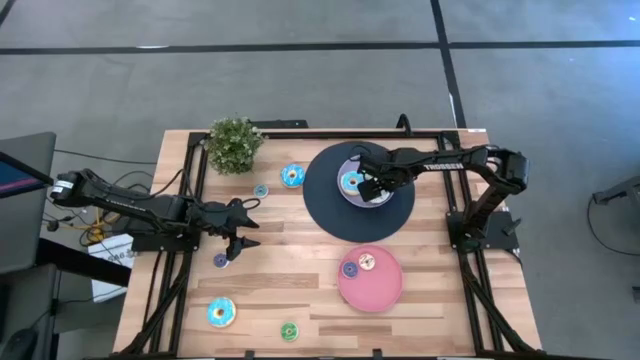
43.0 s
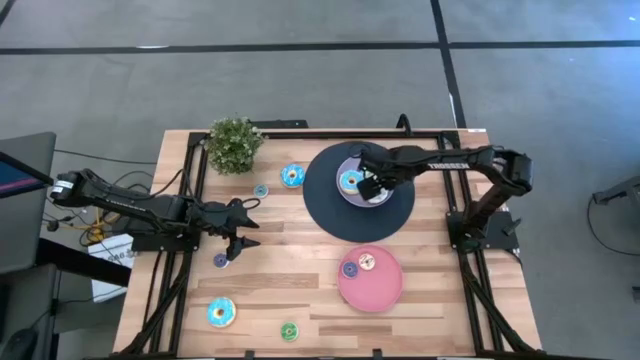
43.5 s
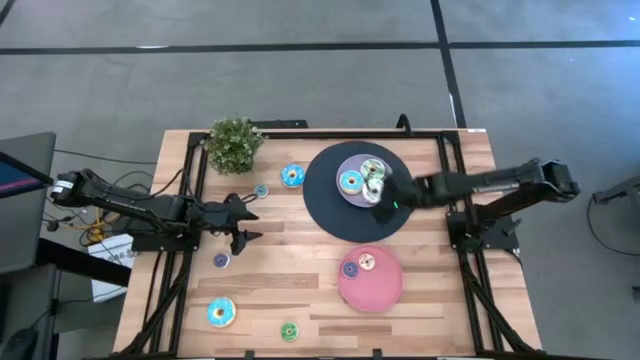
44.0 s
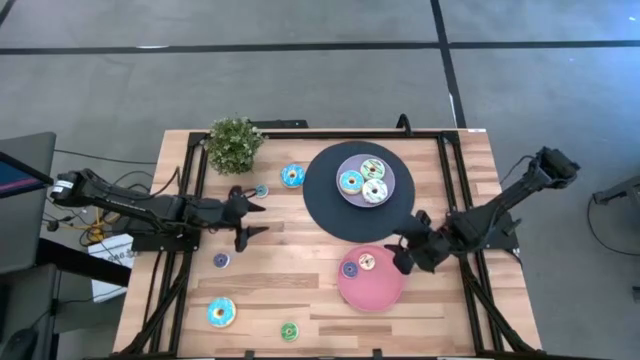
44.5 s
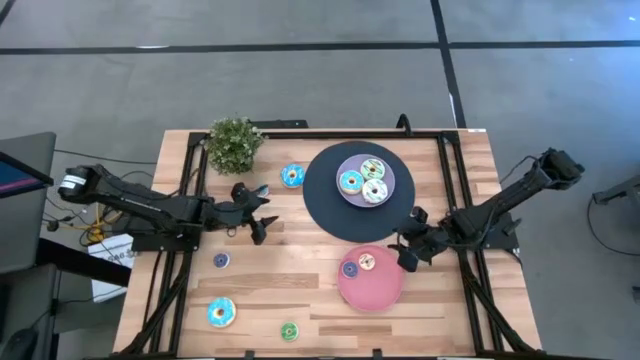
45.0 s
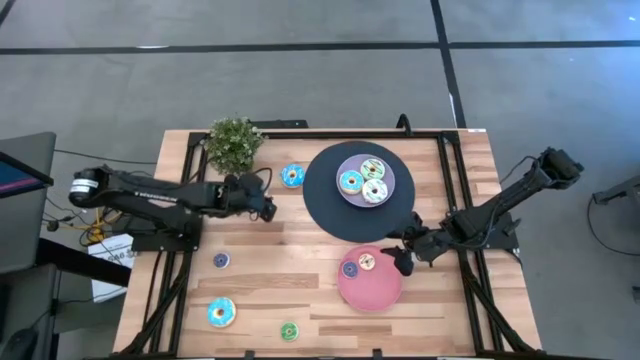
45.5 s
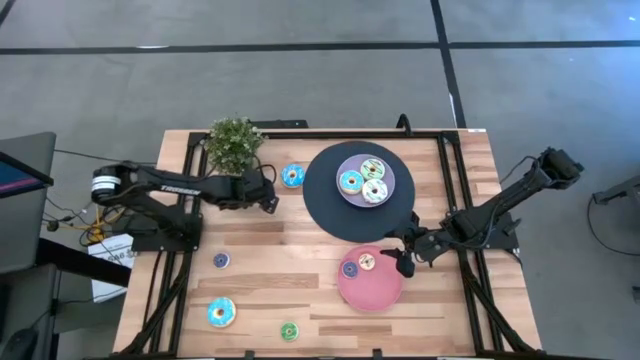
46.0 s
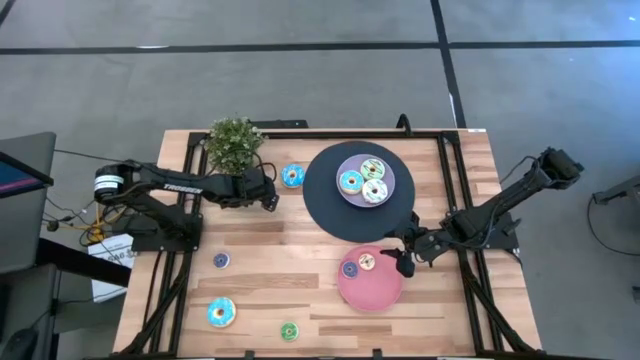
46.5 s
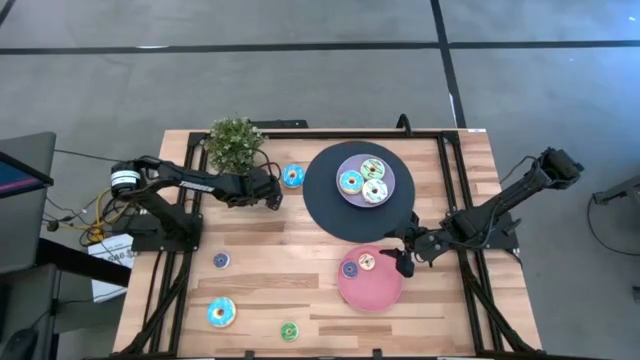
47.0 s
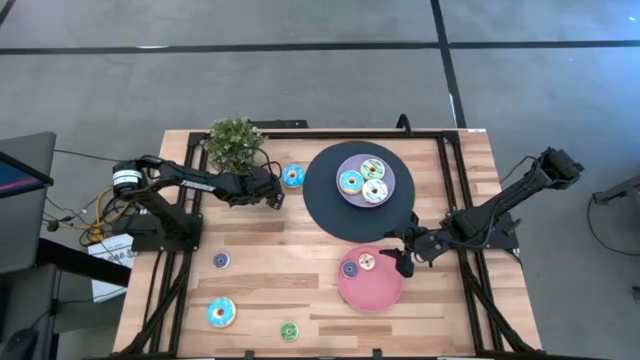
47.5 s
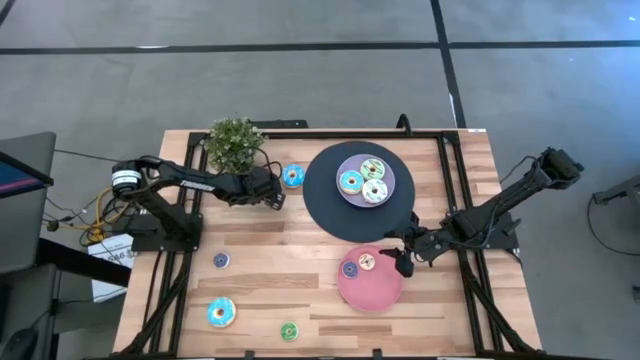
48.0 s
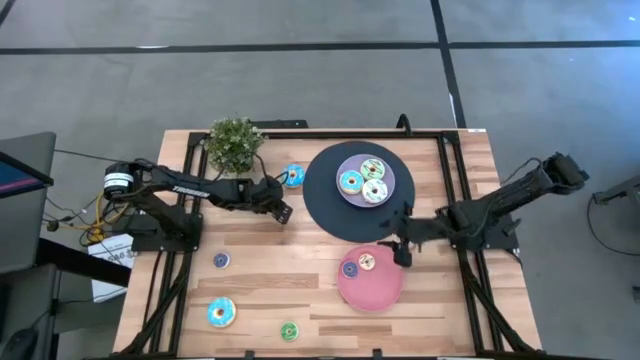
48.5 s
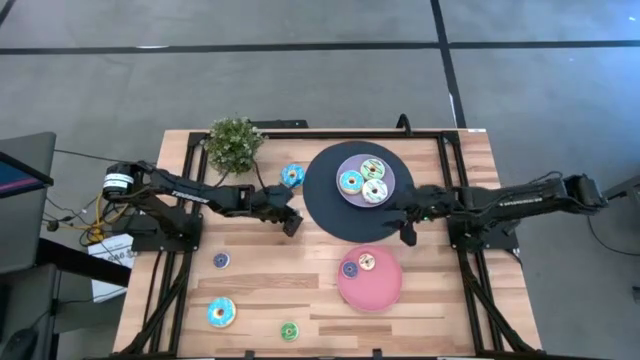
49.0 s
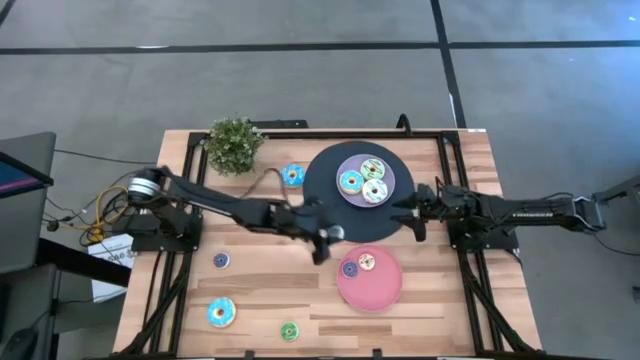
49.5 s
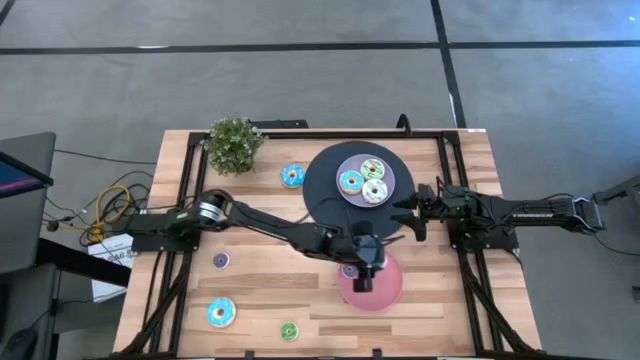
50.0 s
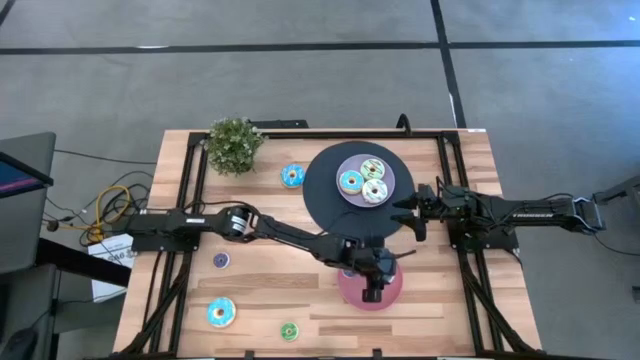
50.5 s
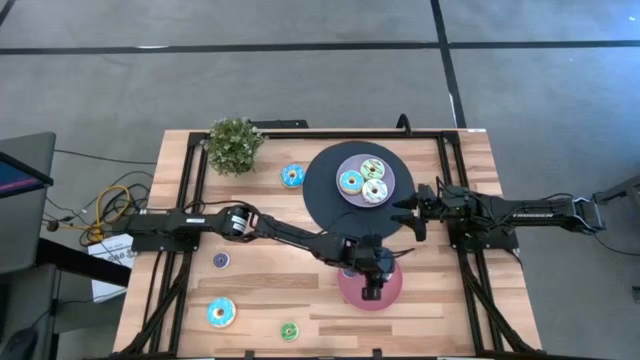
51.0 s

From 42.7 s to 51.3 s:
Task: Pick & Place donuts
Put the small blue donut into the pink plate

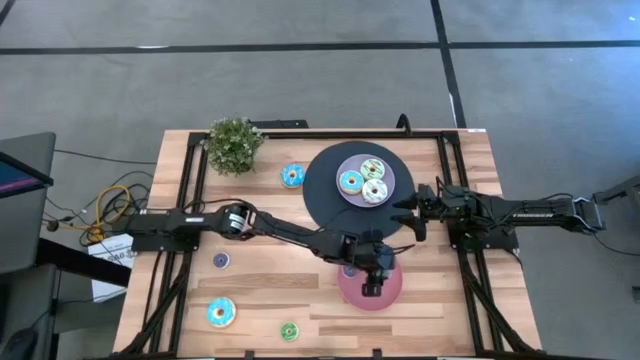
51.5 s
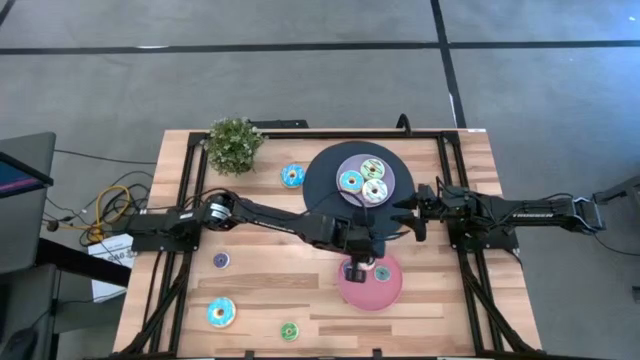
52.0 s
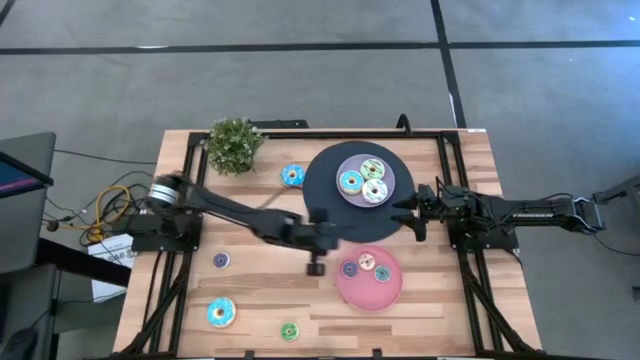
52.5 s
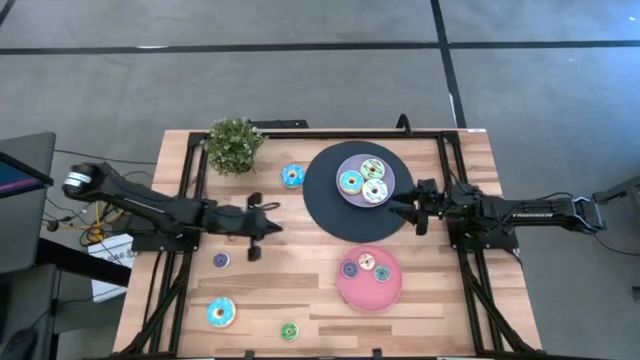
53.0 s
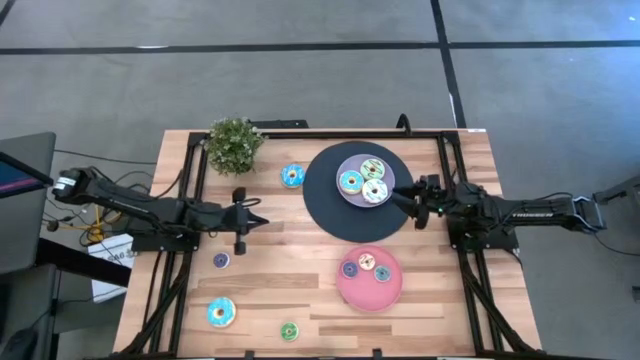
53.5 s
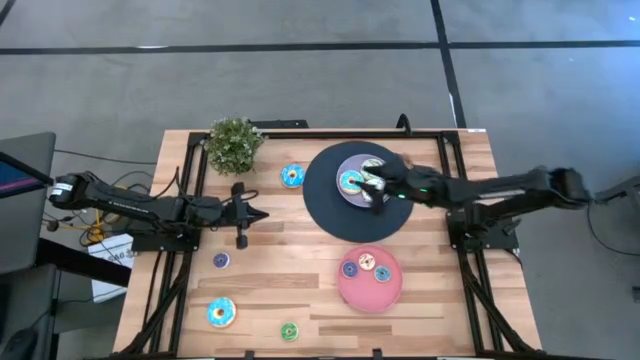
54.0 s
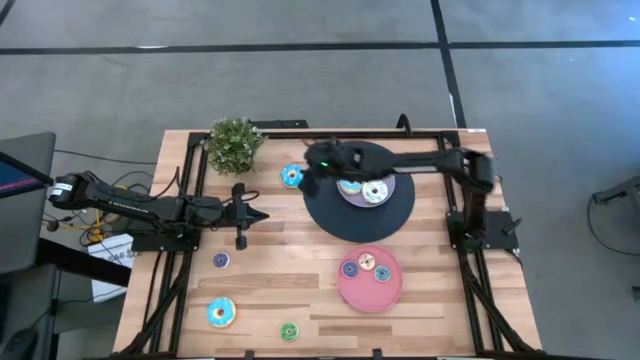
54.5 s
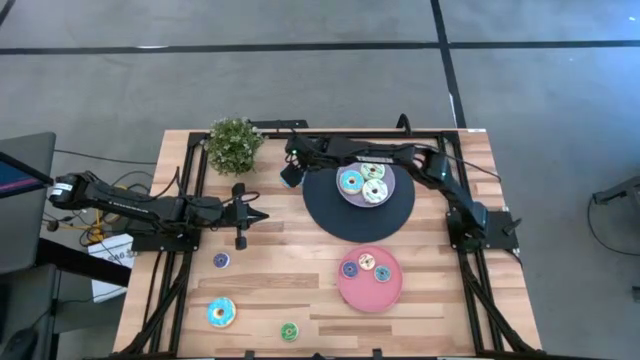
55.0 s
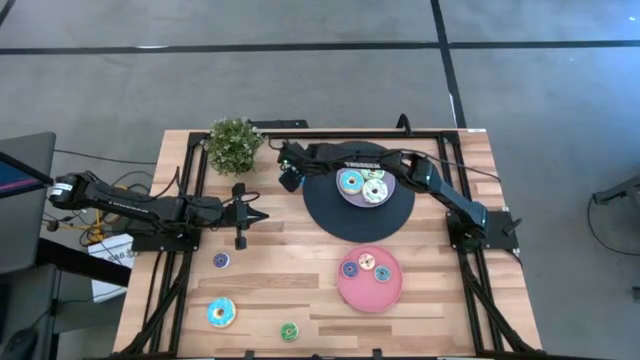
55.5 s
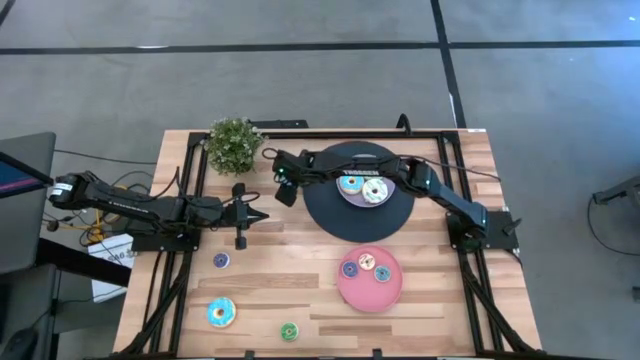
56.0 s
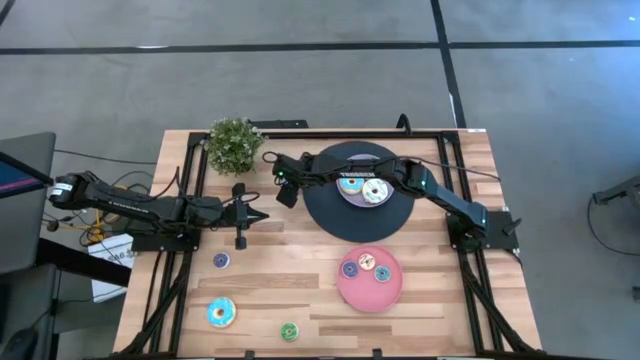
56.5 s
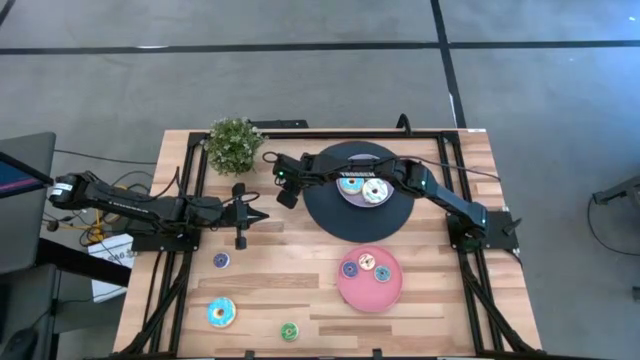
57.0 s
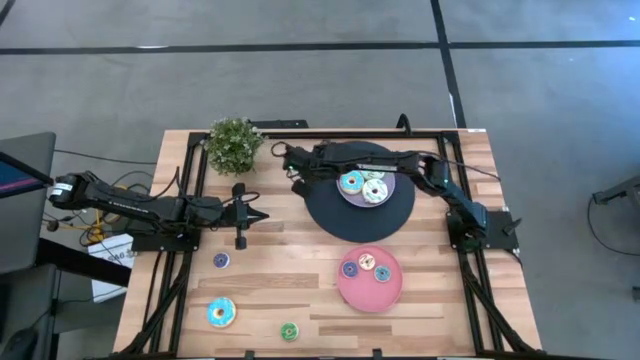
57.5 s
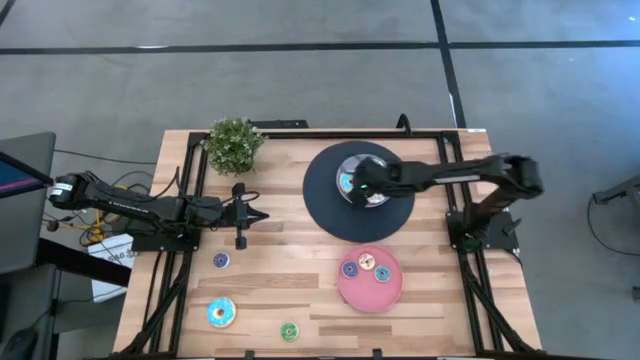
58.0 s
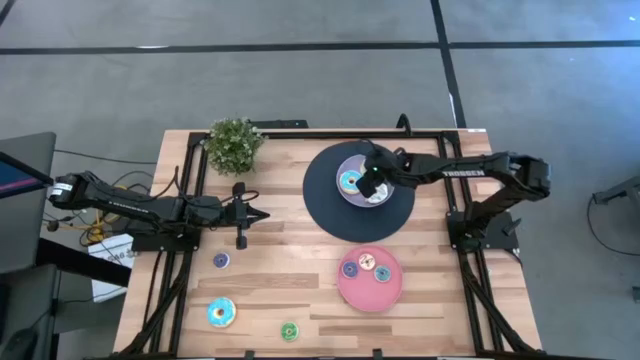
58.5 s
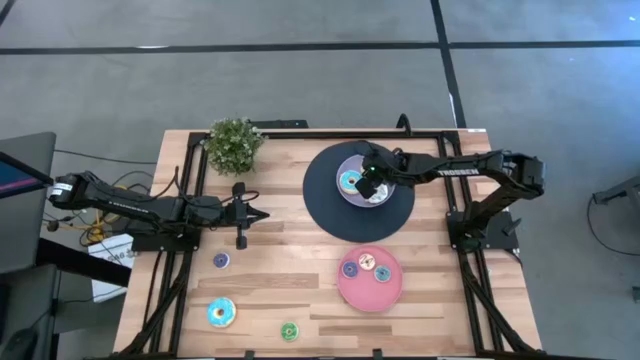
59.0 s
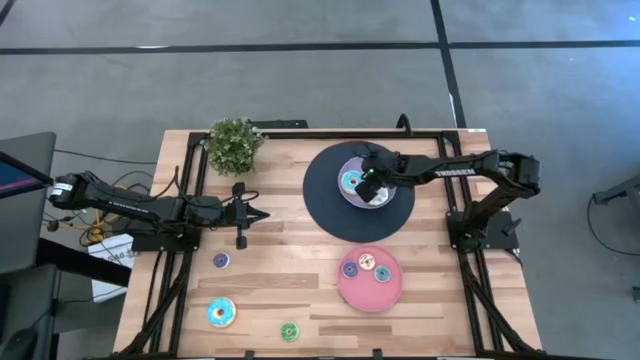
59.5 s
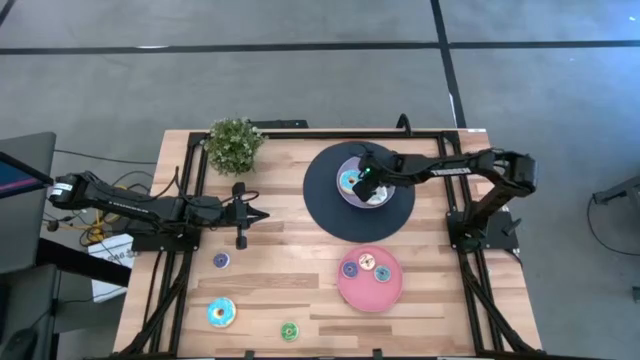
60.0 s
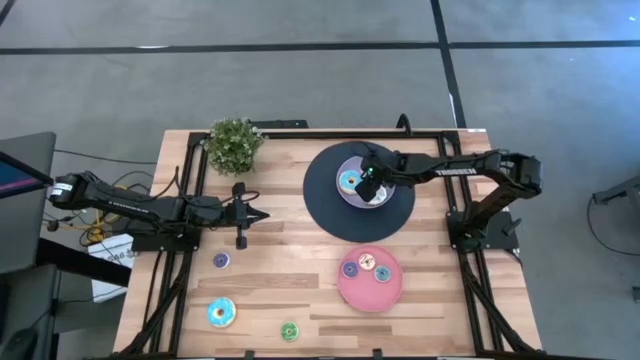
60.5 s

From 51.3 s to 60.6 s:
Put the top big blue donut into the purple plate

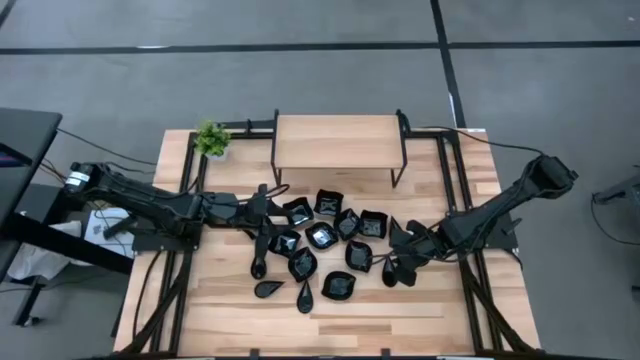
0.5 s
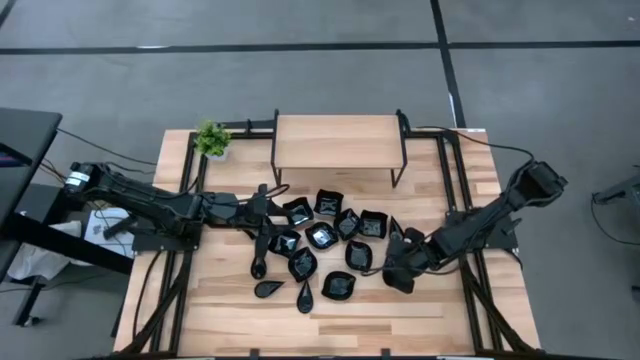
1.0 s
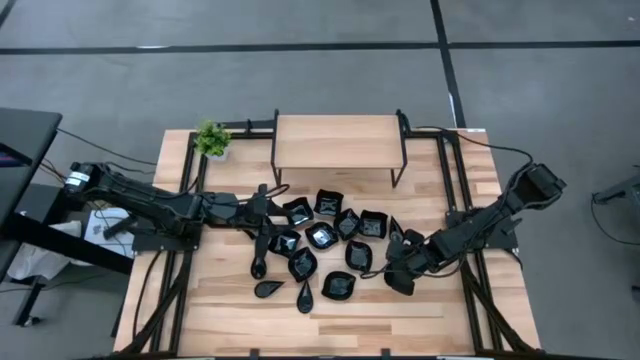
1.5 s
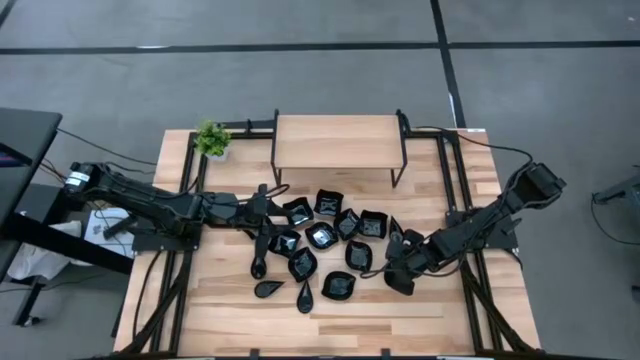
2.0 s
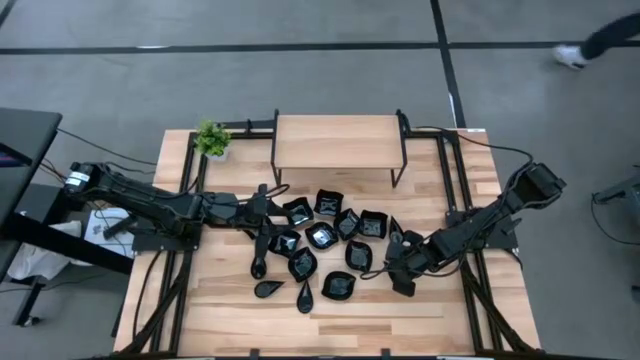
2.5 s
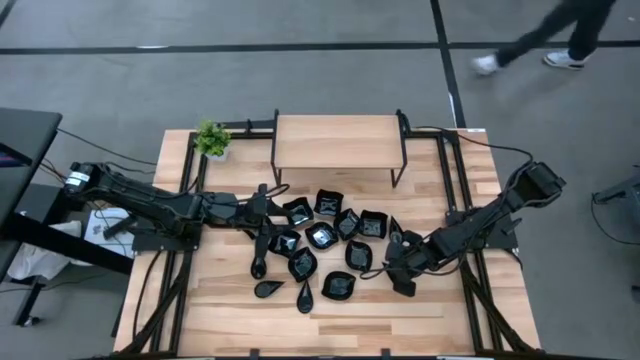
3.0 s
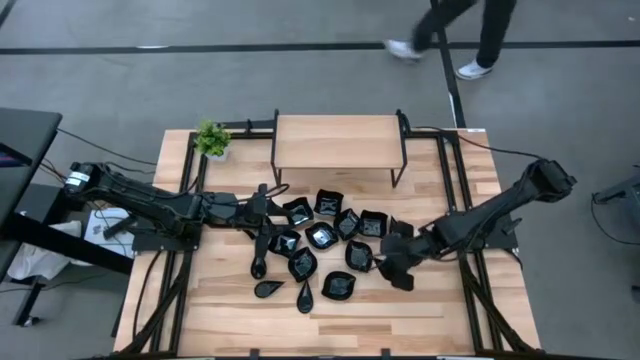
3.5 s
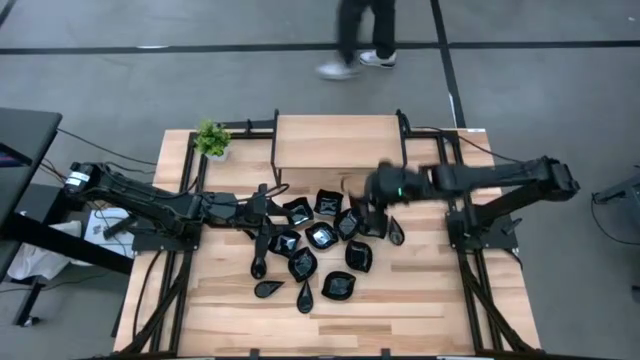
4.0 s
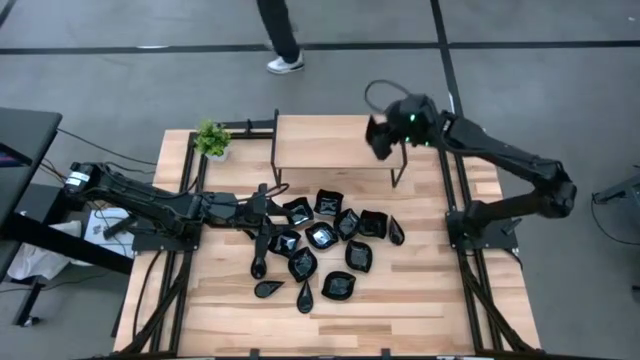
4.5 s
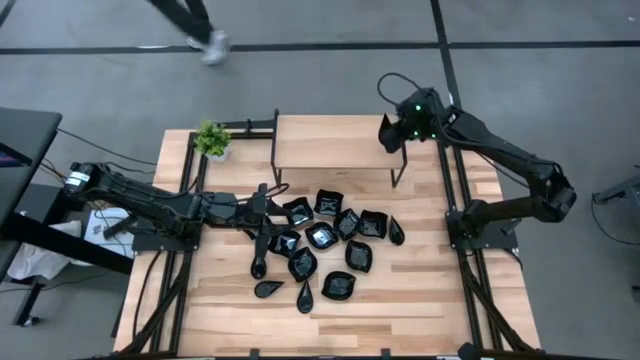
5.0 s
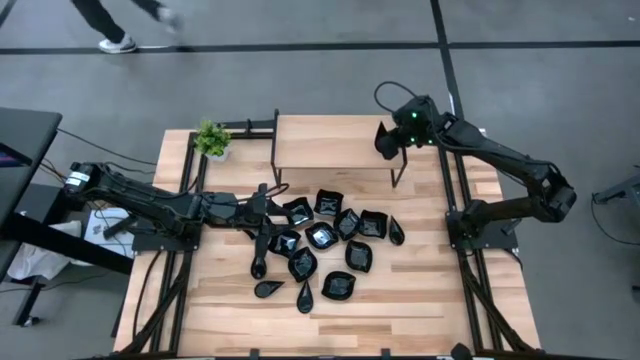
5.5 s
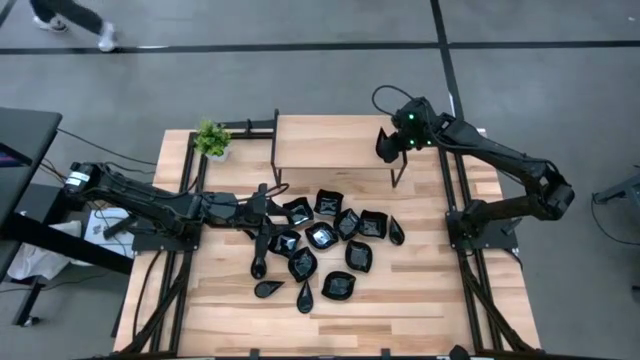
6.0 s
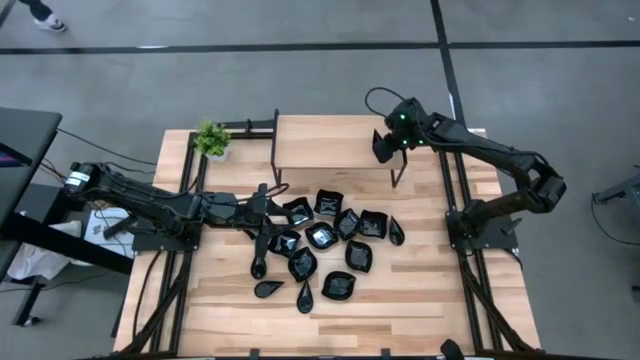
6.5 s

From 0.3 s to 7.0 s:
Task: Pick & Place Mini shaped plates
Put the black drop shaped plate on the shelf
